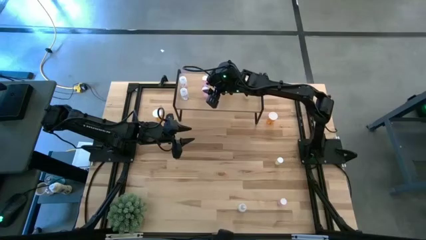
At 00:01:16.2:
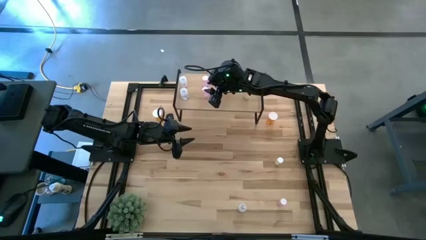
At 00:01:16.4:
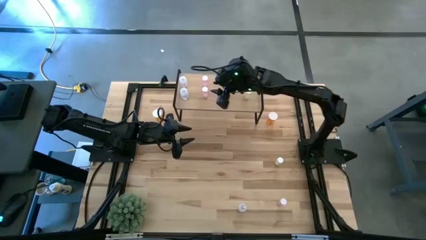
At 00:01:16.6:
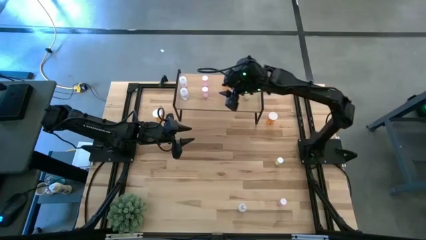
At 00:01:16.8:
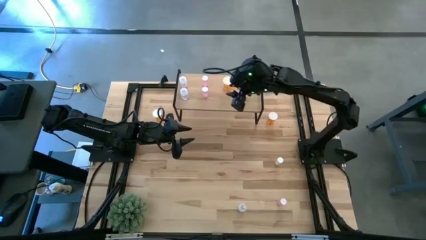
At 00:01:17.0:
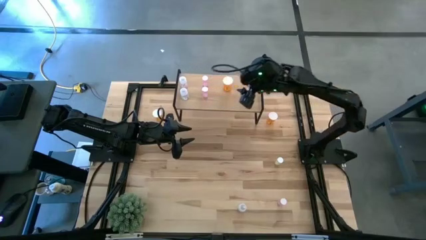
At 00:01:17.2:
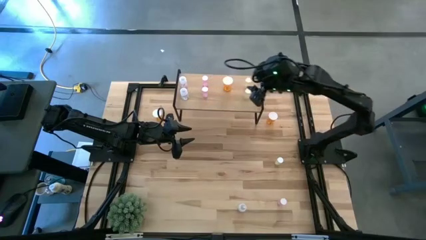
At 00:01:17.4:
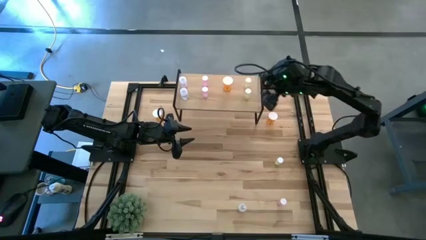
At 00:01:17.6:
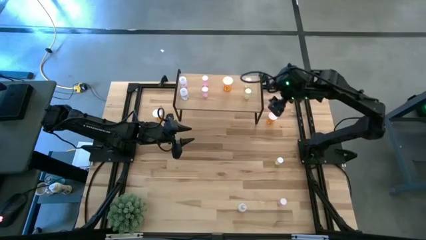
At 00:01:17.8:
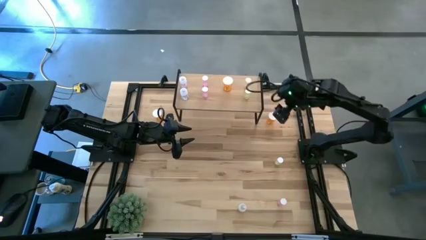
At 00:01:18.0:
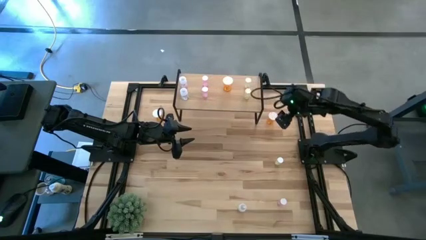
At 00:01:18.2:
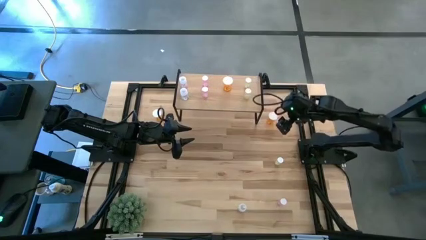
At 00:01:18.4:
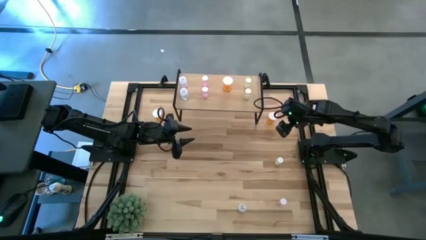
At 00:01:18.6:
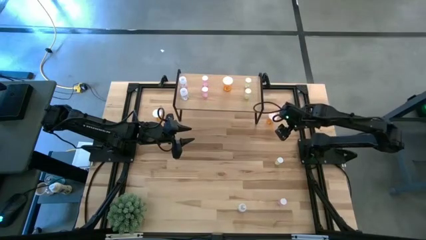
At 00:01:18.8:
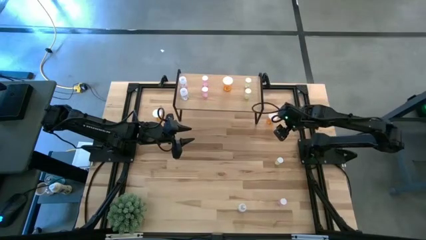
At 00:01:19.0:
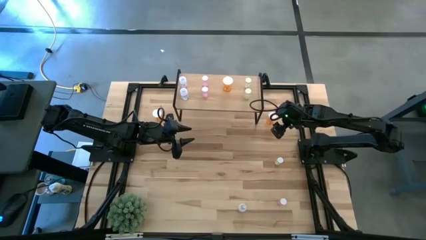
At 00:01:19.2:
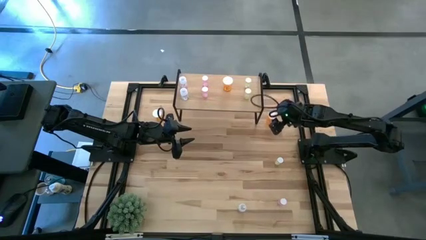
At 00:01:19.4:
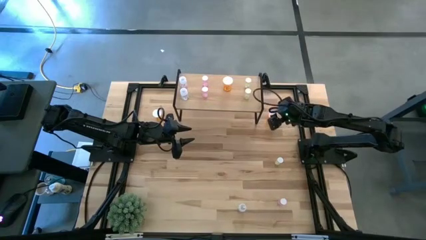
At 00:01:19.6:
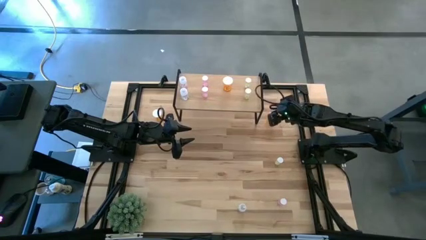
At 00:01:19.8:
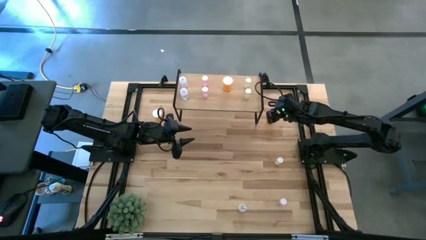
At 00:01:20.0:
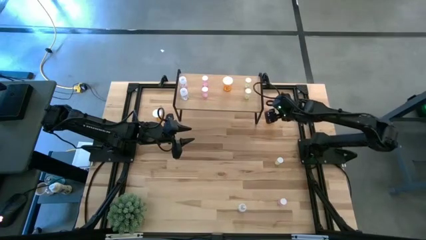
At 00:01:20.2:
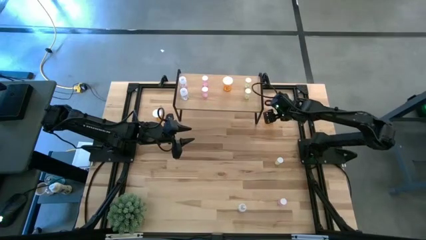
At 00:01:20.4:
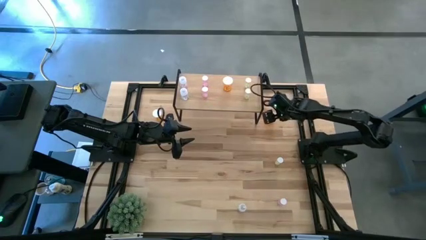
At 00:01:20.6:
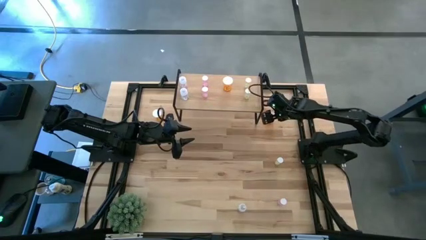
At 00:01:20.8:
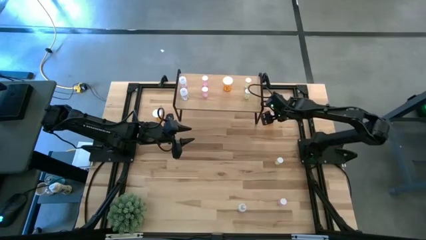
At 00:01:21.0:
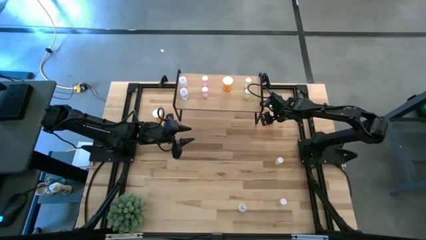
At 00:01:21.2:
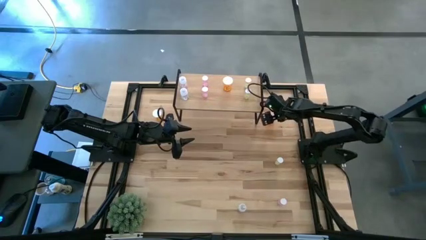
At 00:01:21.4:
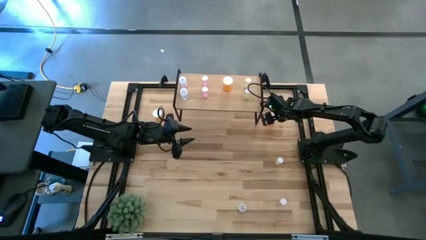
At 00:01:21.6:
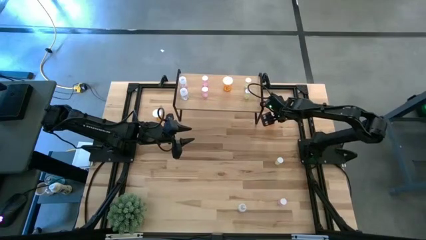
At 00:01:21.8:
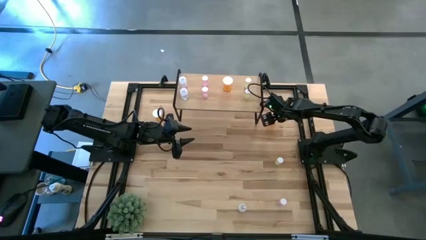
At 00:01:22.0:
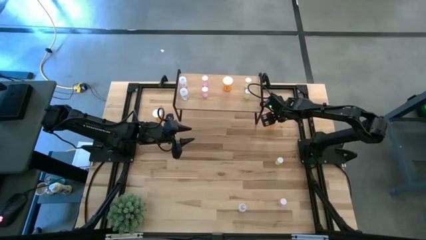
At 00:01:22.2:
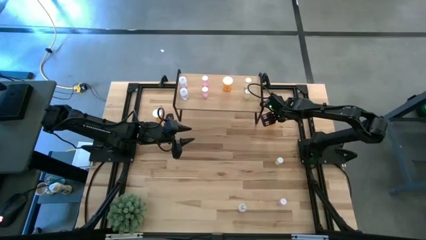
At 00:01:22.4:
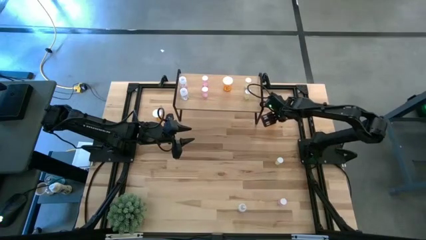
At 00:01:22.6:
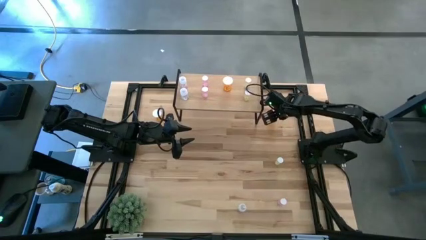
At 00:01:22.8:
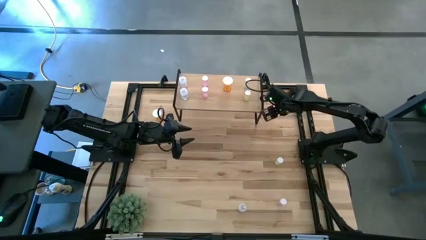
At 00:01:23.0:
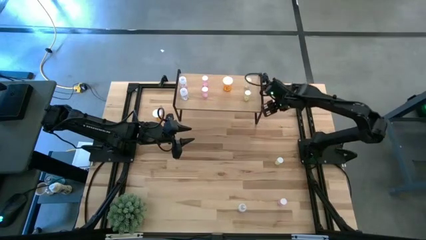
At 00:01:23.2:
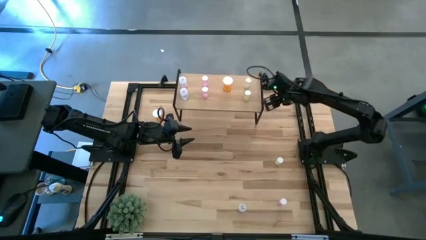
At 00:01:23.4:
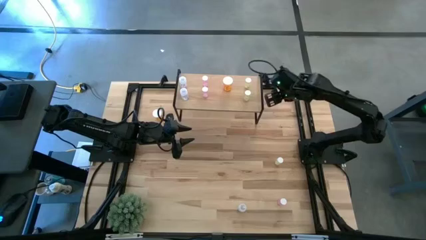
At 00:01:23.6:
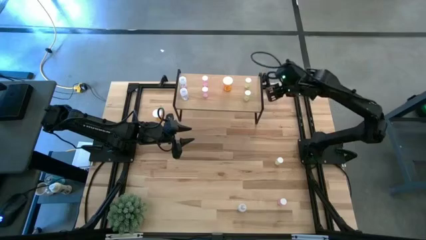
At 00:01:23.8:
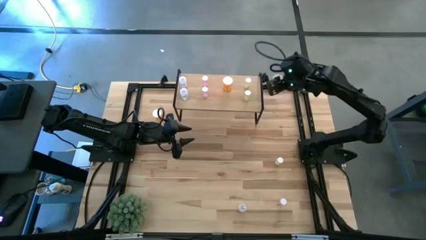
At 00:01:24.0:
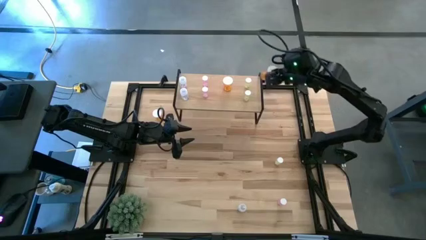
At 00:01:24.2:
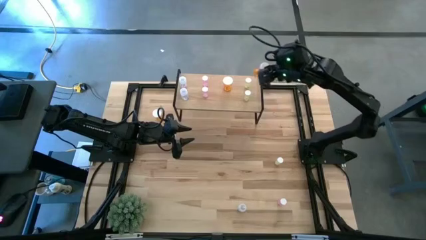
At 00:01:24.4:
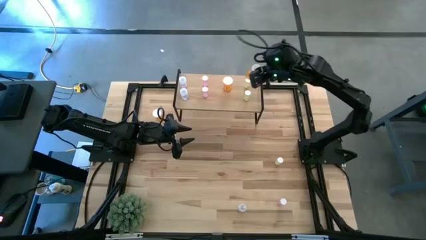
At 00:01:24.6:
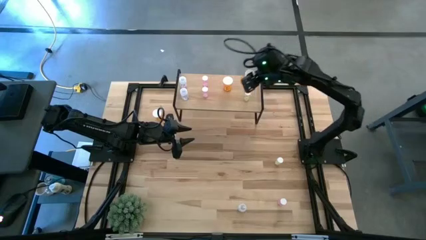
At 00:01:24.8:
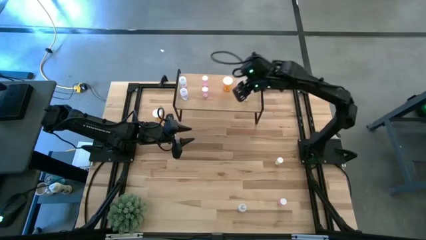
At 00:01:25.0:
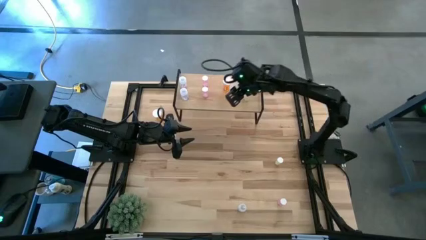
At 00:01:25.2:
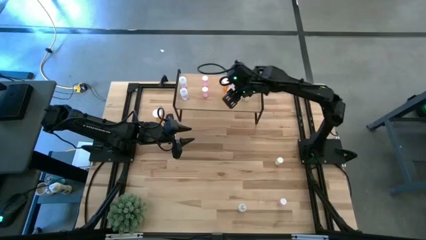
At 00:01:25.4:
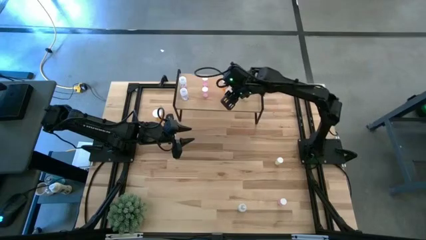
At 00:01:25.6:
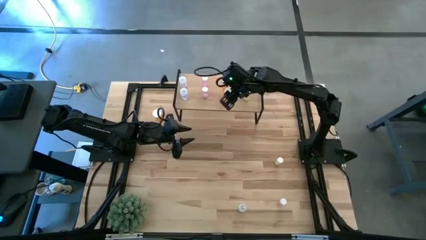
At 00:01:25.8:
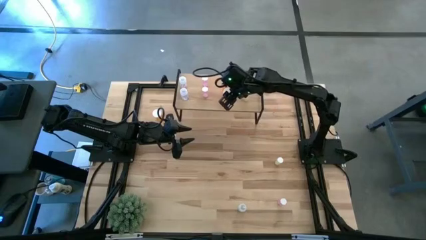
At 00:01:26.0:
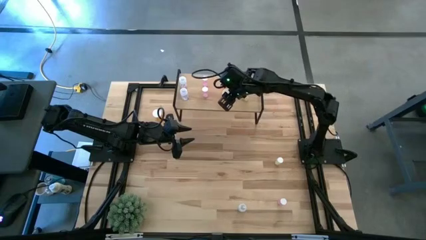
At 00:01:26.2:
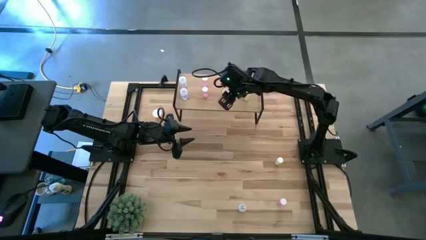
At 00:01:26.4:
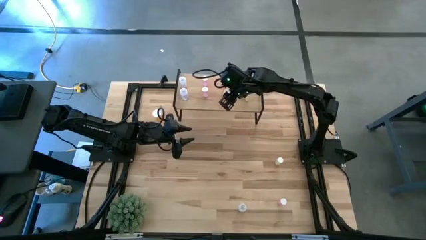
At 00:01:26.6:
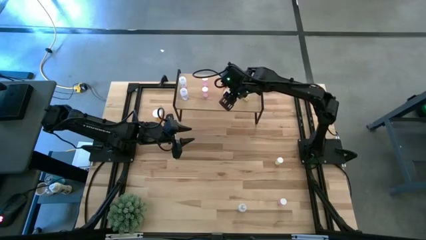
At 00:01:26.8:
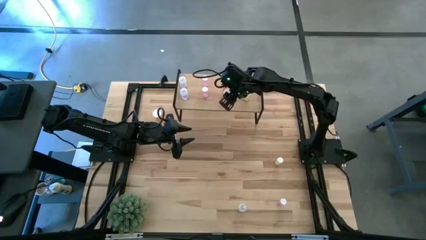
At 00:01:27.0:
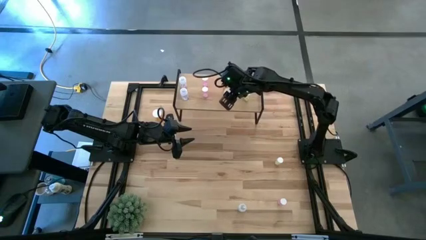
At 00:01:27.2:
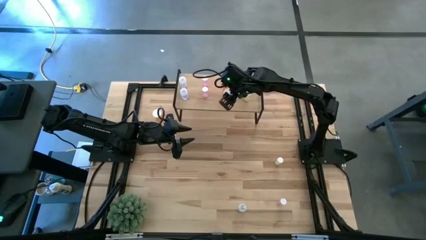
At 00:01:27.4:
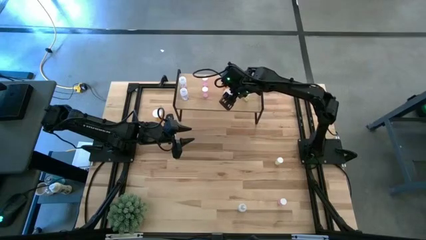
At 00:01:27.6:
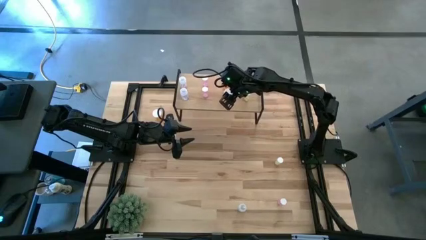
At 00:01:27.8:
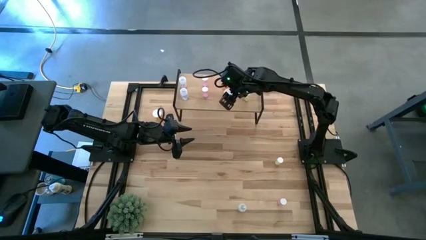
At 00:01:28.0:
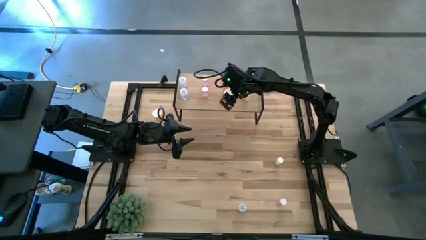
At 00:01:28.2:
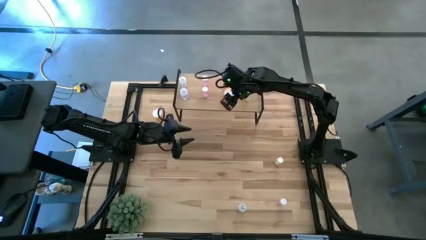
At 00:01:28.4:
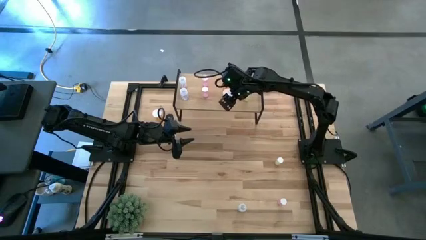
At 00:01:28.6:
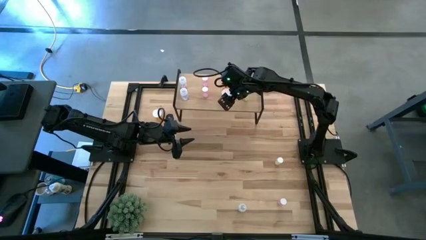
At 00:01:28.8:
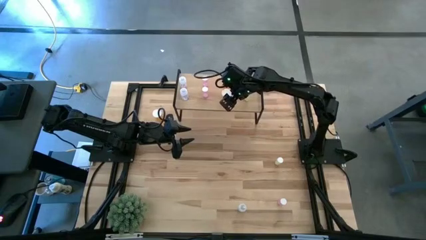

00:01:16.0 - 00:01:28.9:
Task: Pick and place medicine bottles onto shelf by color
Put the right orange pill bottle on the shelf aligned with the other orange pill bottle

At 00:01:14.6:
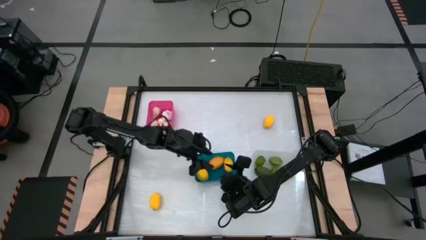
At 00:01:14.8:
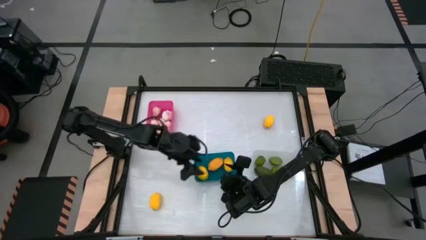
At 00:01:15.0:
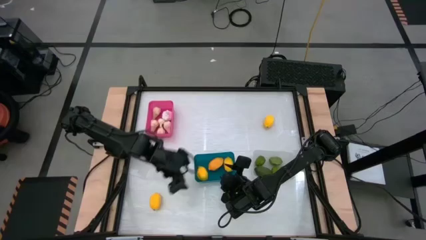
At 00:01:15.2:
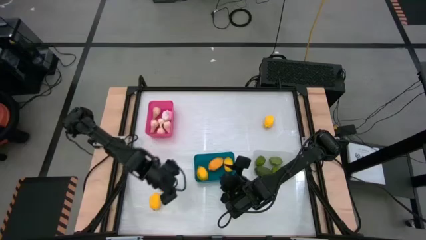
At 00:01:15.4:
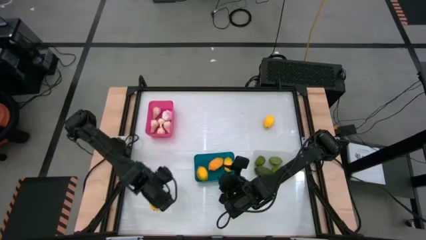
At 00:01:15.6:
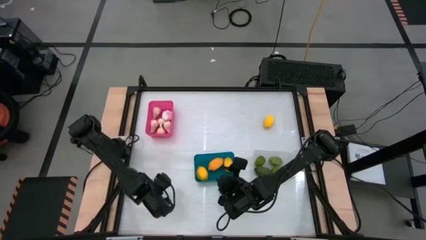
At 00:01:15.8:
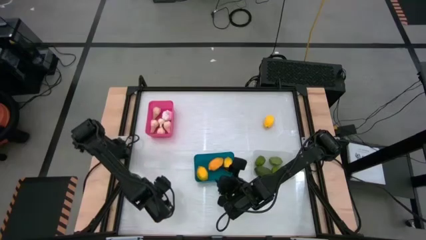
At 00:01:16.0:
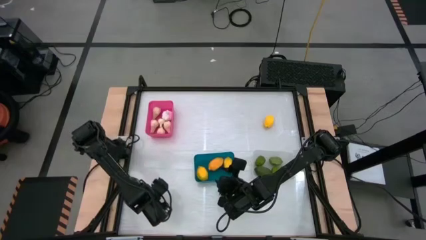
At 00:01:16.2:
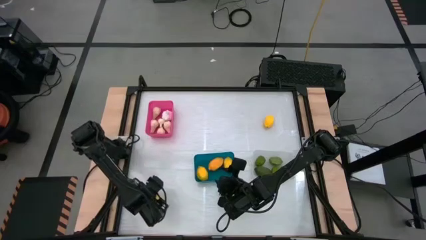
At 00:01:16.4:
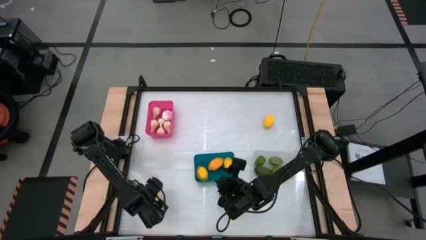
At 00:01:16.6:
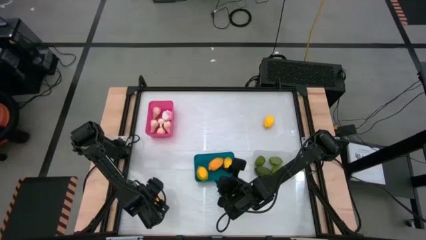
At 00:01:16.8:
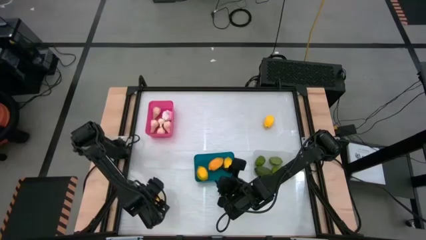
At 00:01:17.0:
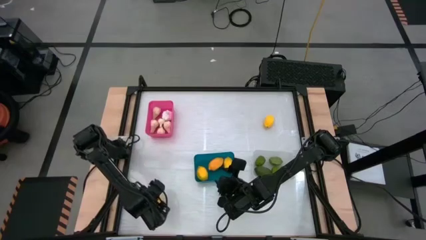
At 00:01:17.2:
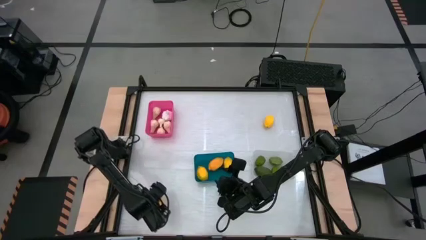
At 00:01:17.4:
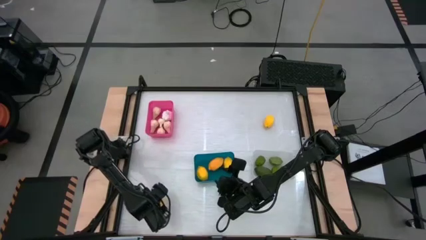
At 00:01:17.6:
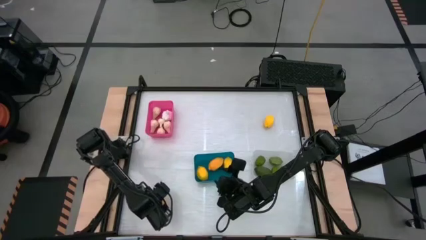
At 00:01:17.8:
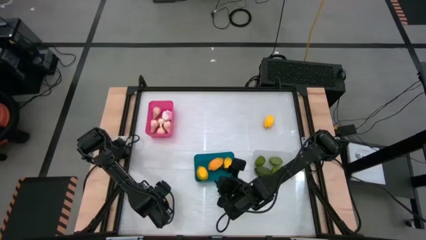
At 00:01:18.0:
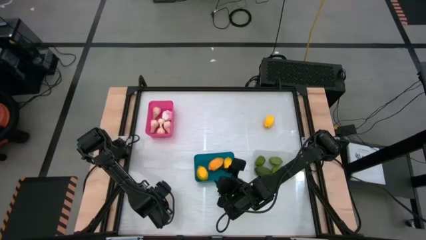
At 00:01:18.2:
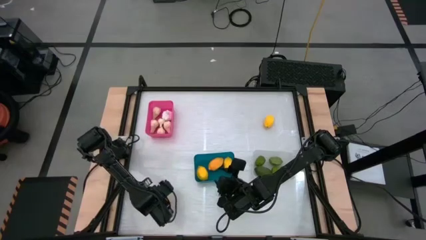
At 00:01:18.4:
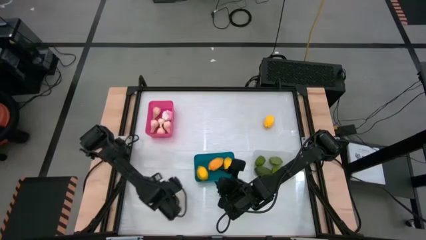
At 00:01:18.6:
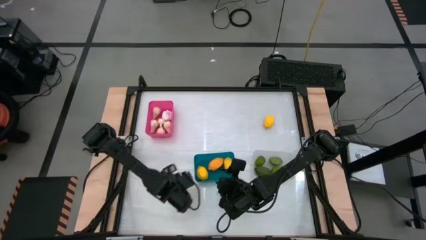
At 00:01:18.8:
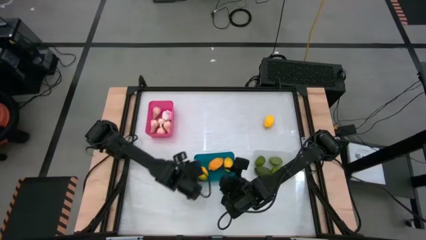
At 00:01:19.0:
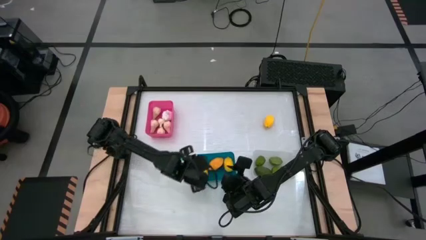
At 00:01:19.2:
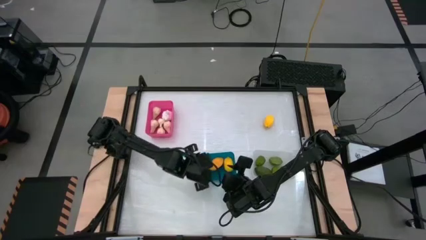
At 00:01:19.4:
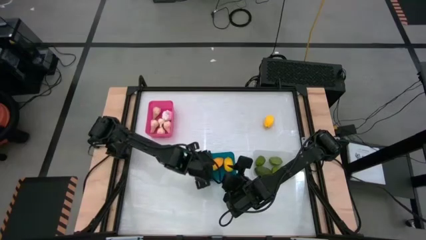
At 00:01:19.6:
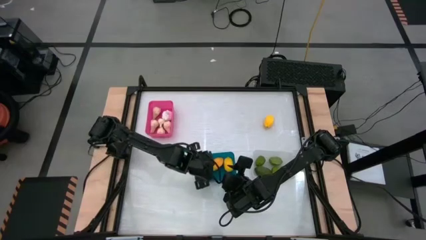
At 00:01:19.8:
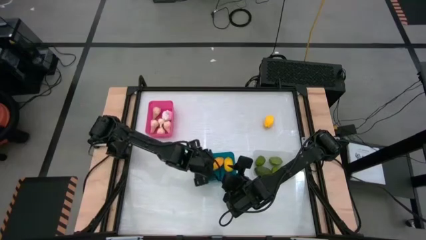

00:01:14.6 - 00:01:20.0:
Task: Sort produce into baskets
Put the yellow lemon into the blue bin
